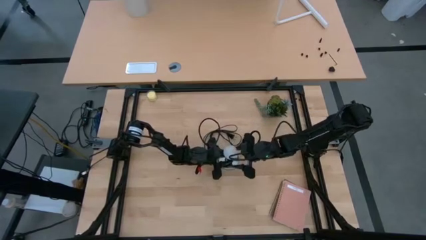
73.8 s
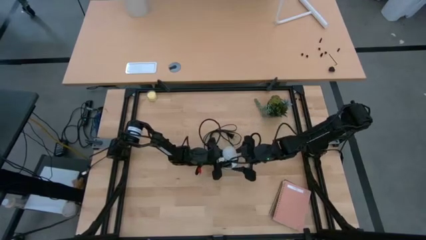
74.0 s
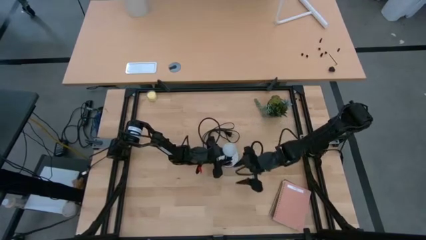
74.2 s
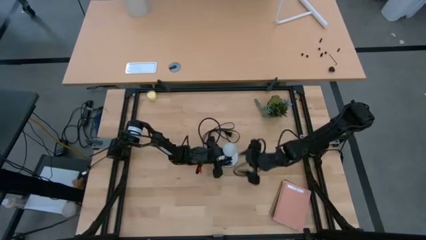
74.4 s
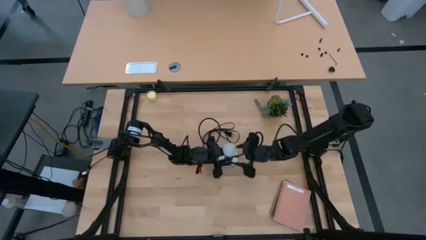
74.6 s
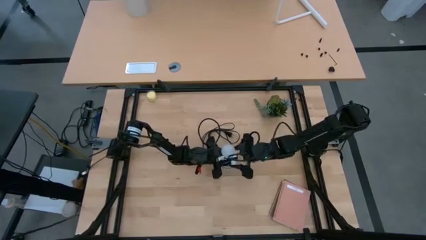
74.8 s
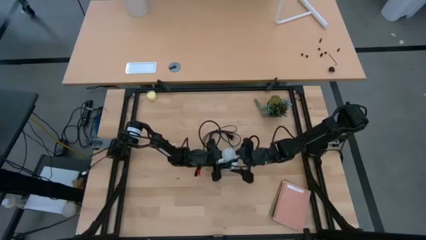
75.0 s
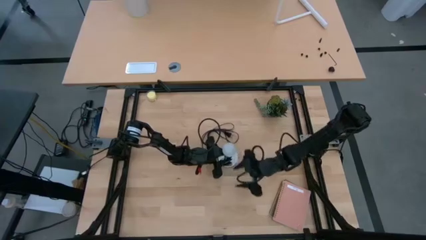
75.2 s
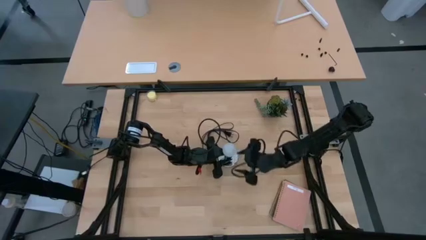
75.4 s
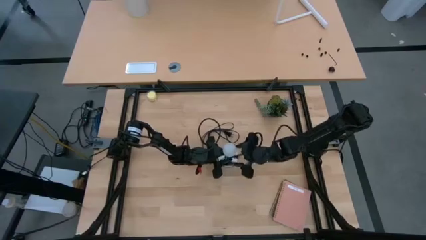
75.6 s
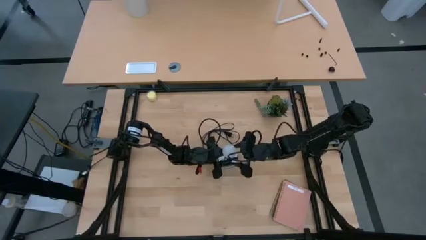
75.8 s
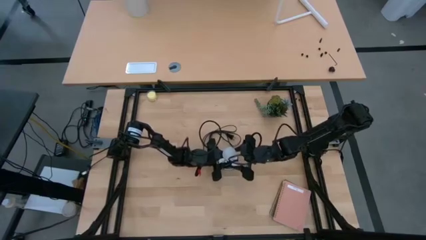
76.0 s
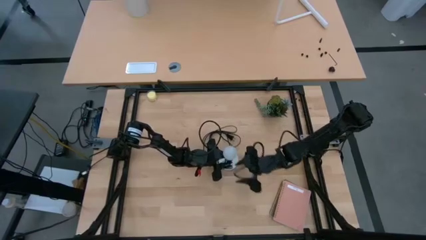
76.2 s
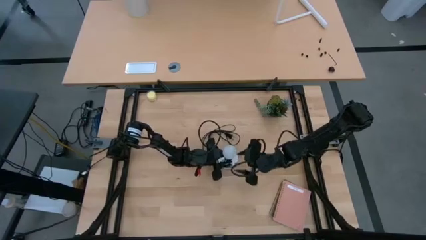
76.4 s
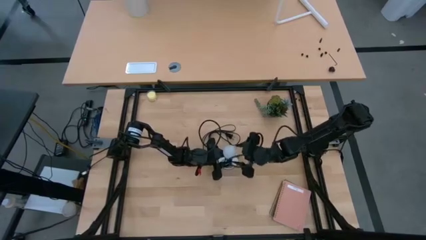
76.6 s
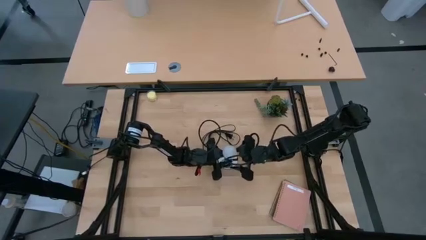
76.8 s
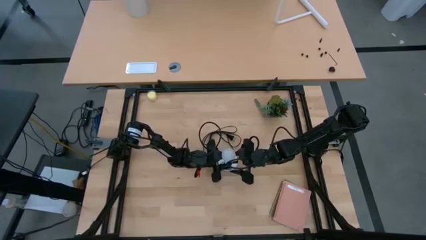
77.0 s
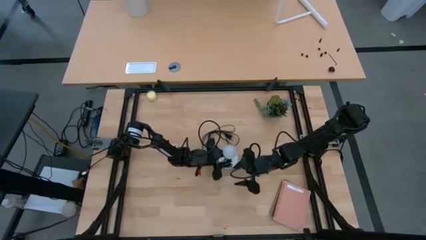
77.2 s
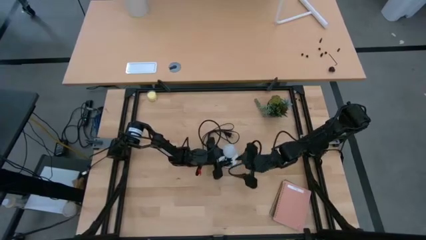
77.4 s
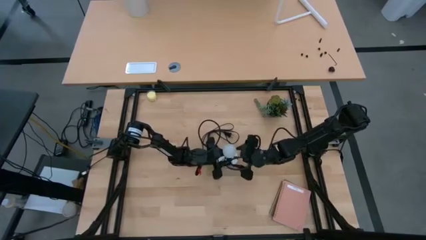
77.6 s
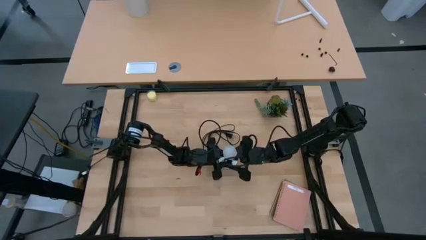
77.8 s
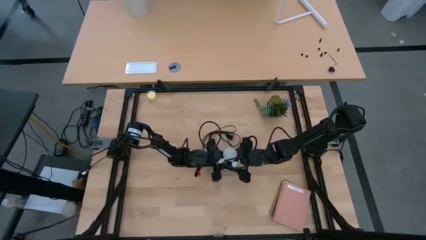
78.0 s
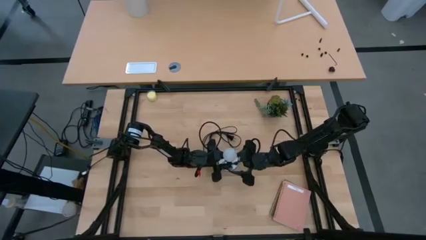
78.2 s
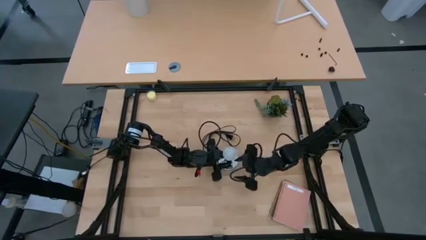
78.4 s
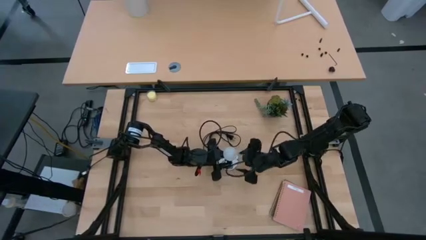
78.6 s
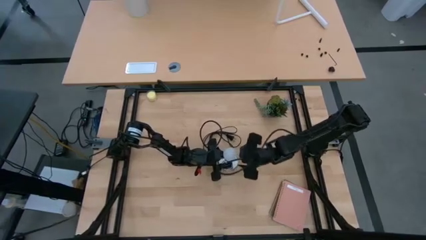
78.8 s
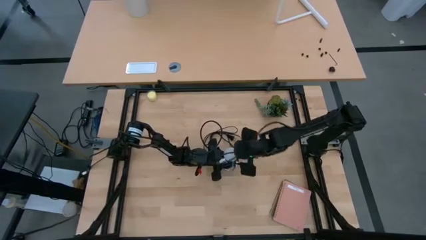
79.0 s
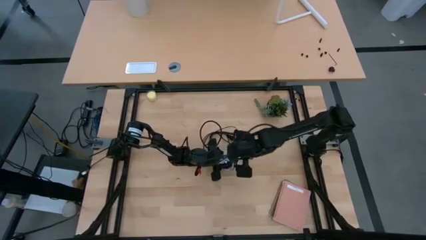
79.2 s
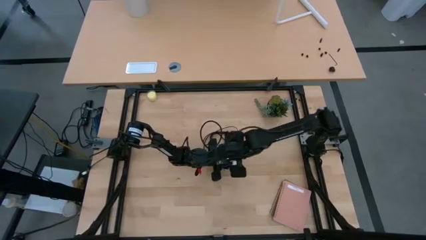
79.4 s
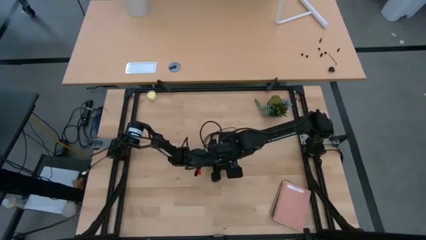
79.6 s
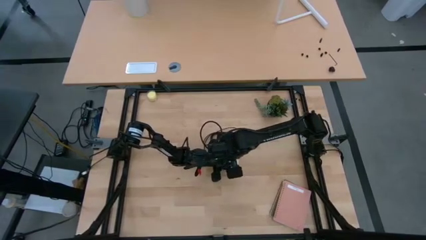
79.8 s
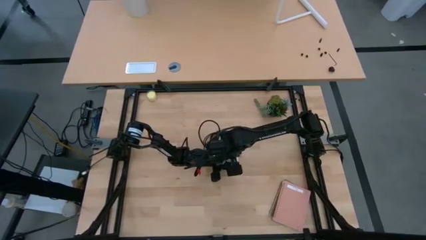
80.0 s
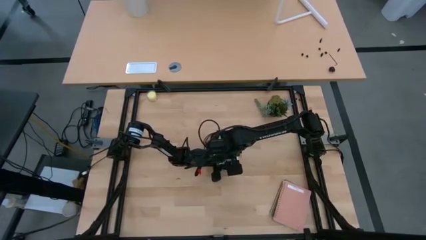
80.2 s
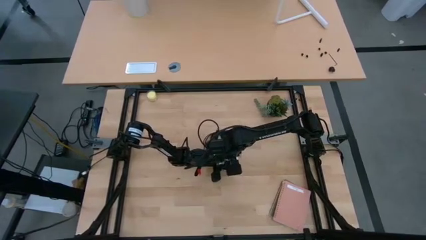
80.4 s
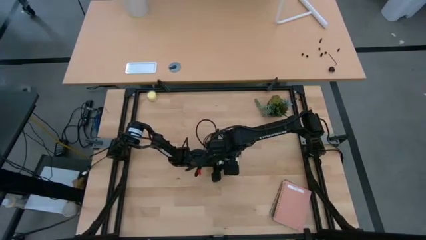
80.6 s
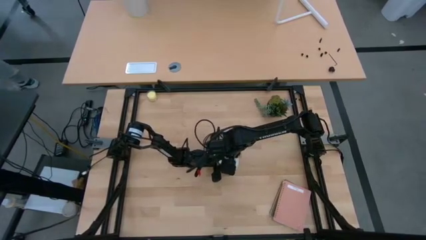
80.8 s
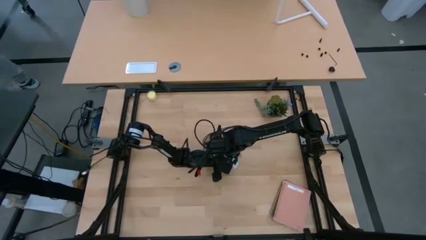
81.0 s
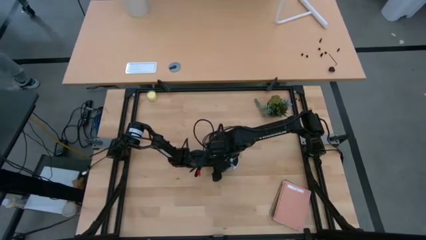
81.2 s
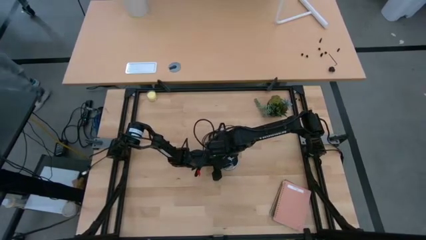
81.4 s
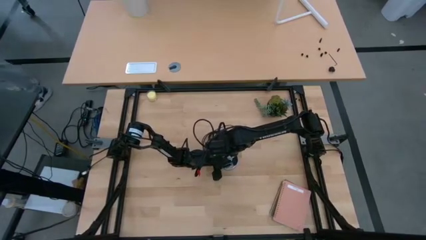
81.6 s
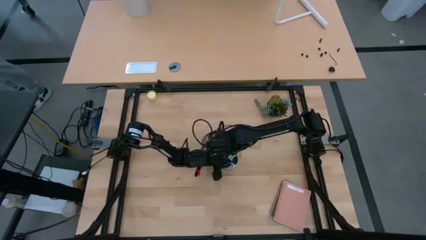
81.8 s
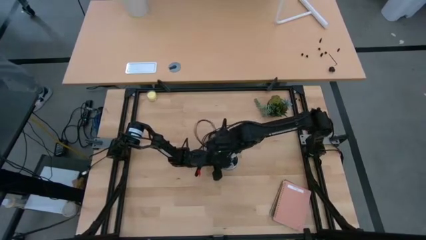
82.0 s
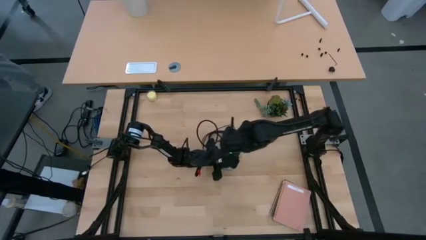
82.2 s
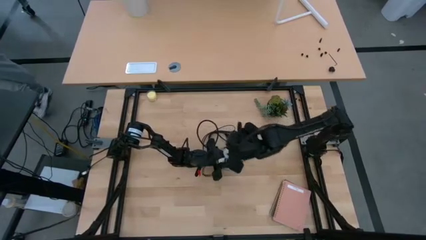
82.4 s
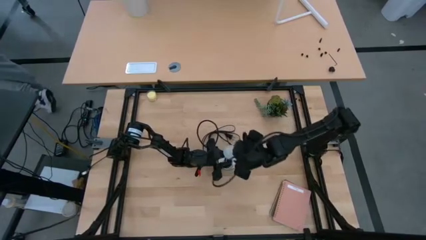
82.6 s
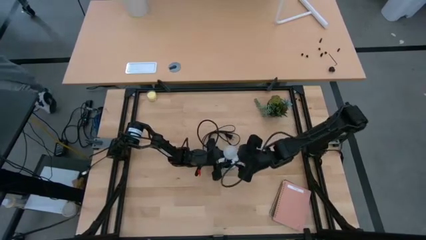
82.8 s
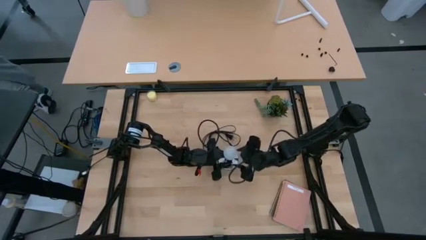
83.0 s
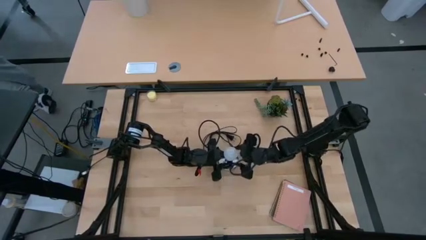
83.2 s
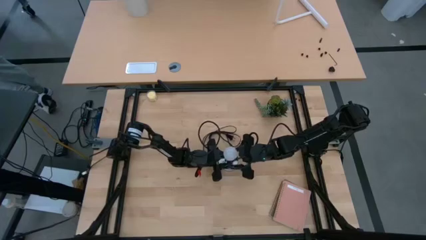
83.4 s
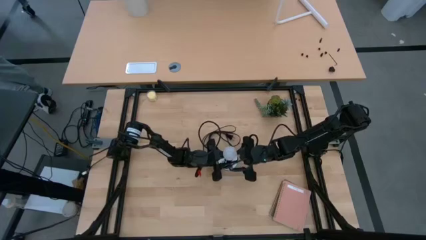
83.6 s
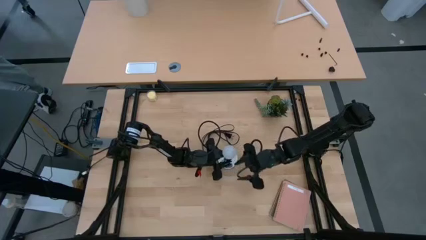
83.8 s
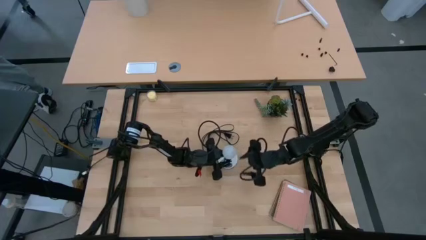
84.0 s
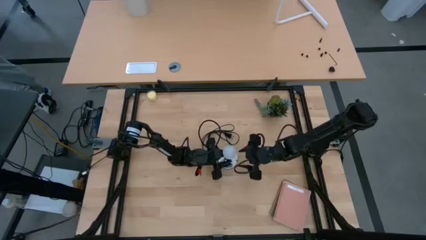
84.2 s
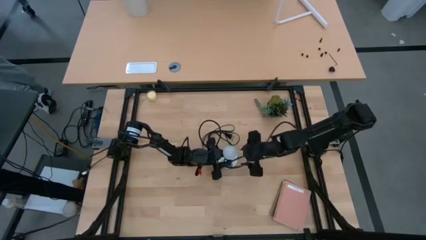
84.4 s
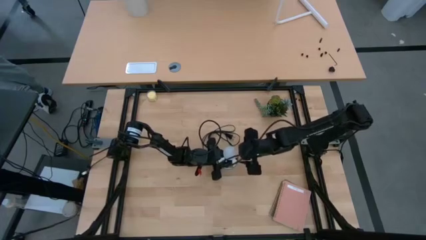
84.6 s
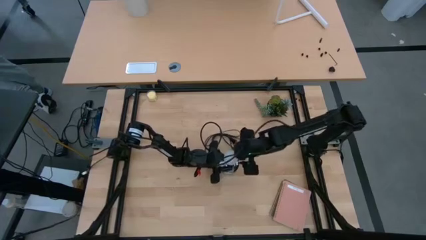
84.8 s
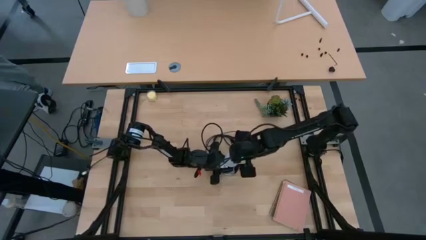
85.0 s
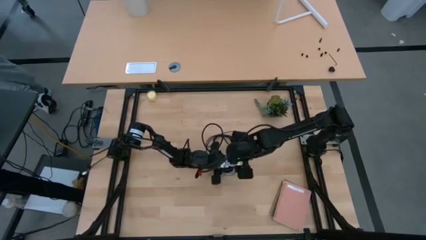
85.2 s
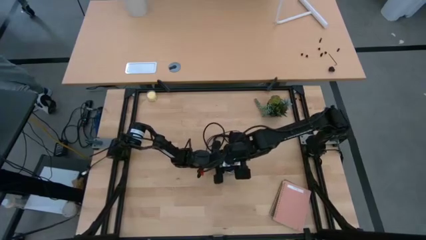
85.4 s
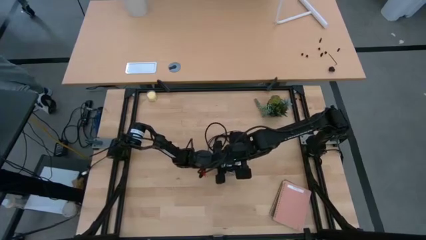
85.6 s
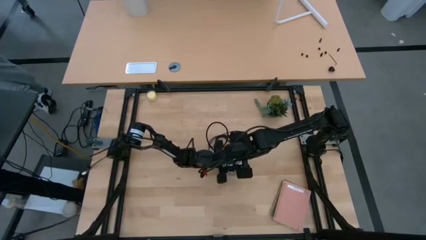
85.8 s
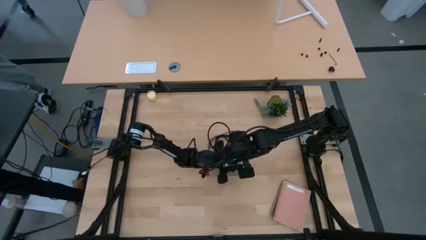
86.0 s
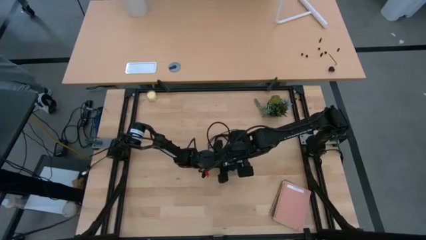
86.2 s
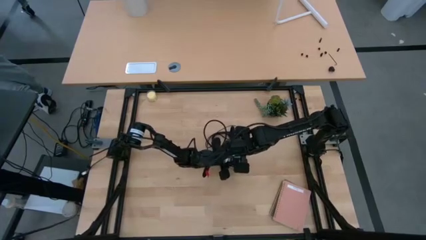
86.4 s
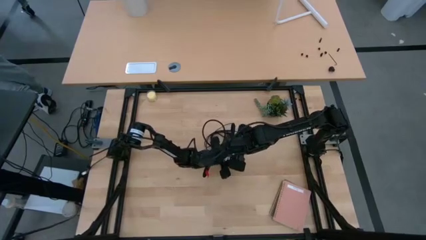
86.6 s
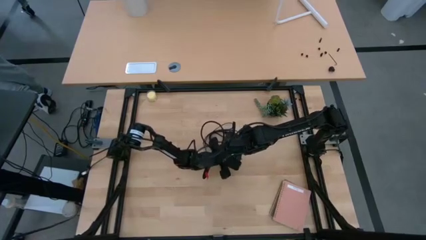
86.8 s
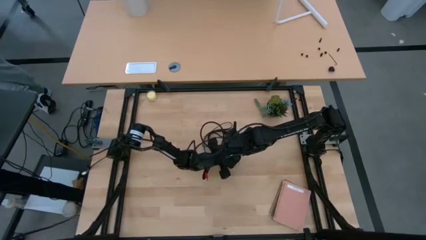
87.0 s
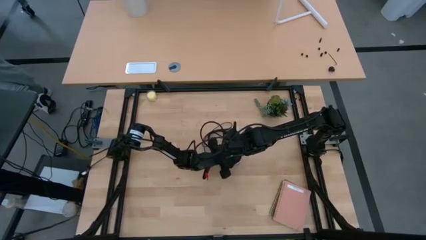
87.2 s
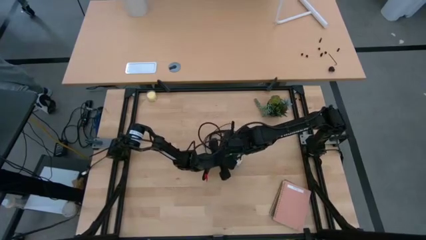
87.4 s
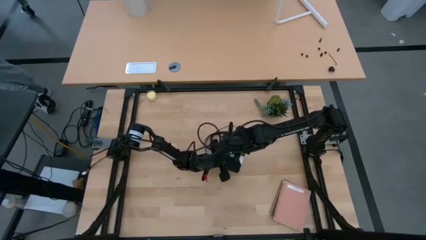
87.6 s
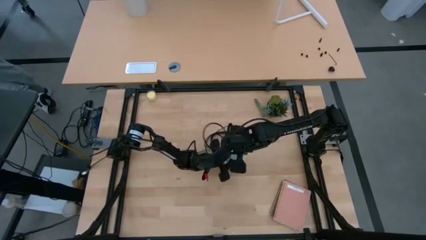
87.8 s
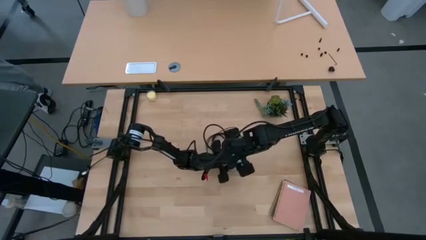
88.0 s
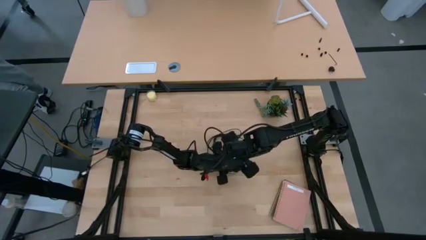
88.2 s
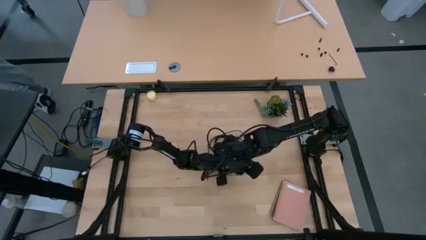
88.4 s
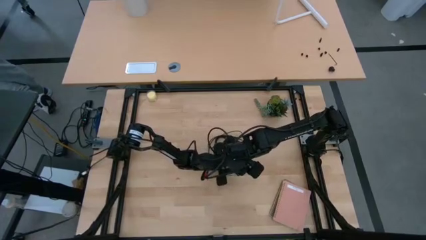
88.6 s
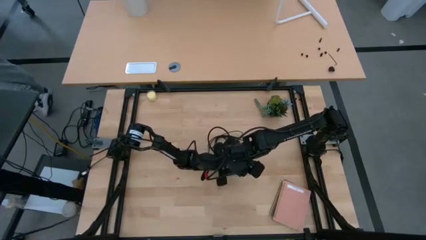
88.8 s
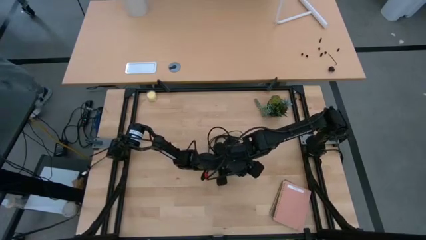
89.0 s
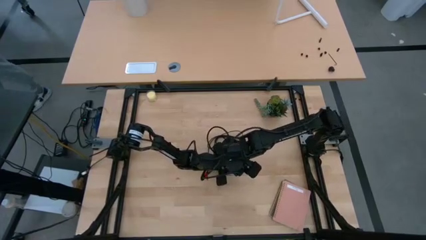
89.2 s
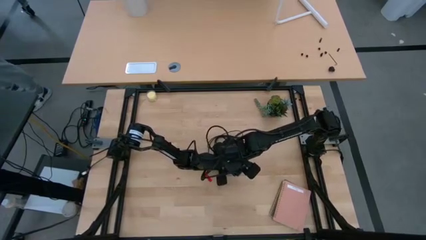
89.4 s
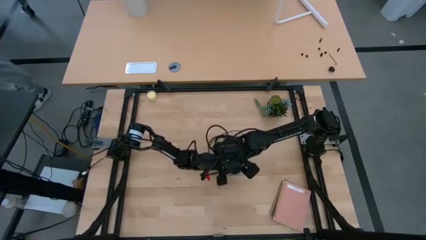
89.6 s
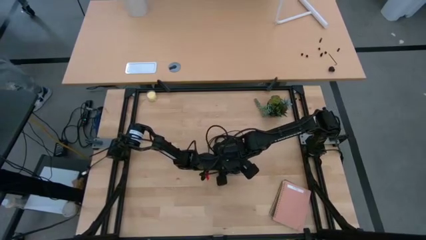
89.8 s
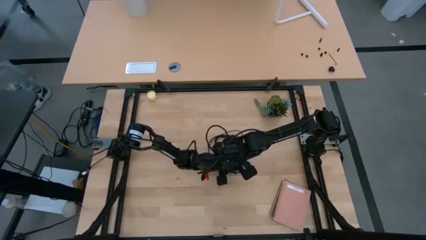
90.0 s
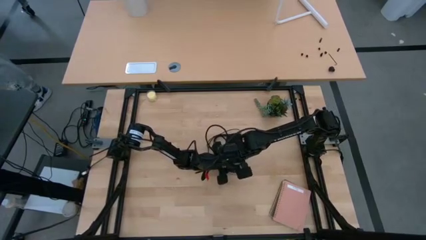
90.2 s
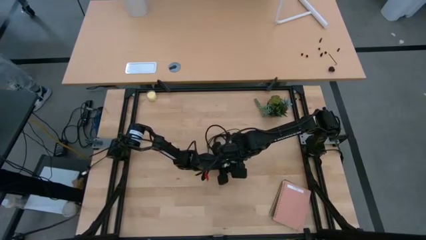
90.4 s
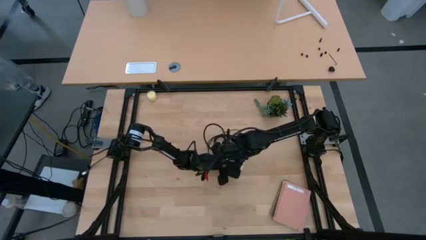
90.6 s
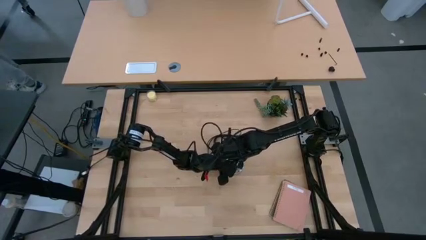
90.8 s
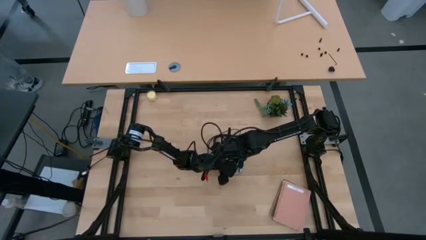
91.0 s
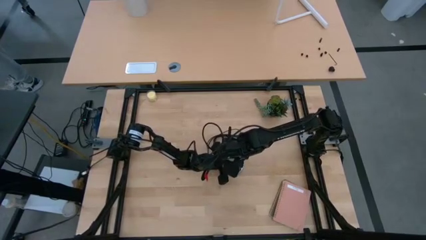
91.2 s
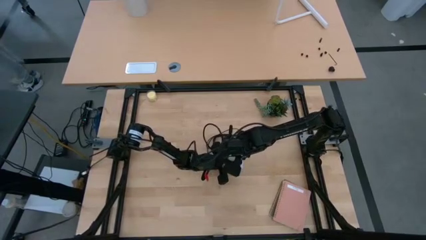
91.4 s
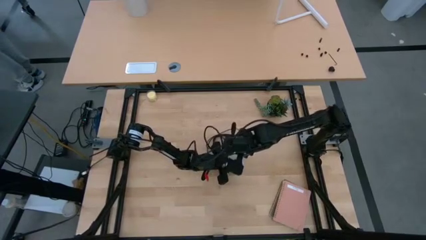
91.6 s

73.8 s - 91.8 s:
Task: Screw lightbulb
Insert the white lightbulb into the lamp
